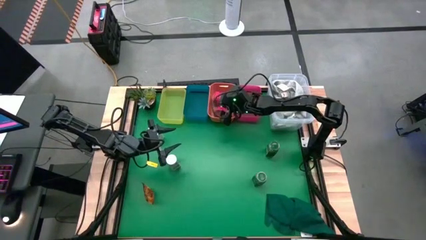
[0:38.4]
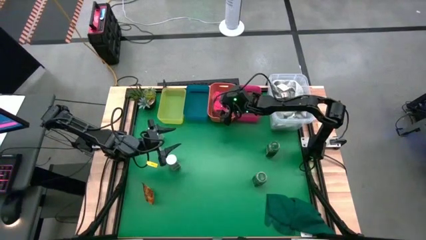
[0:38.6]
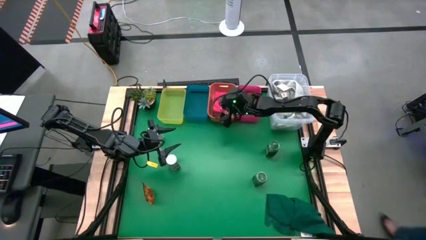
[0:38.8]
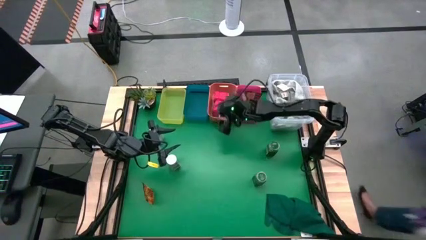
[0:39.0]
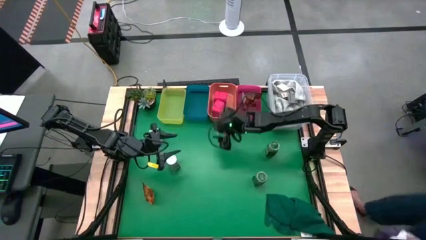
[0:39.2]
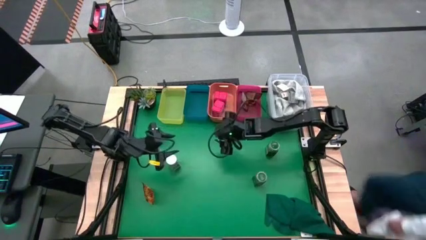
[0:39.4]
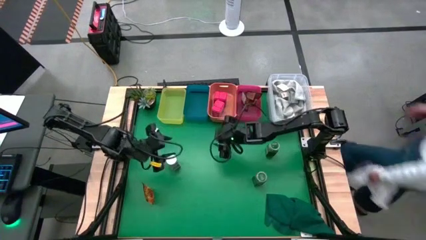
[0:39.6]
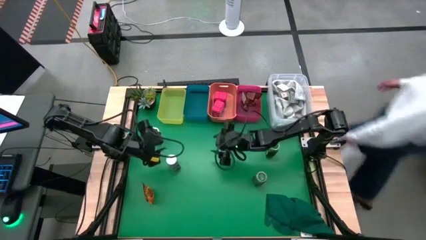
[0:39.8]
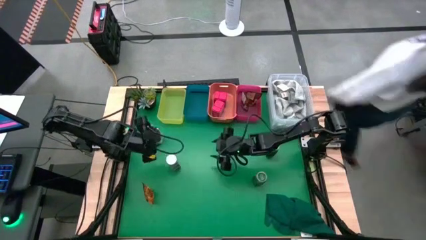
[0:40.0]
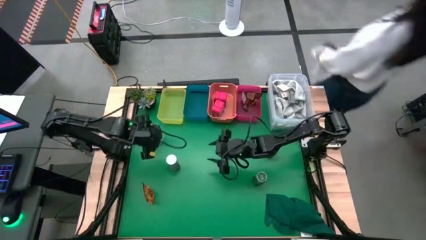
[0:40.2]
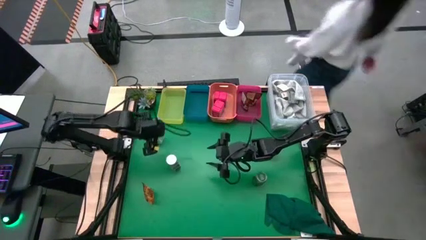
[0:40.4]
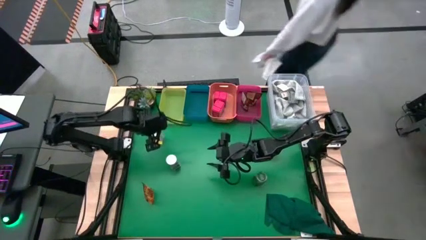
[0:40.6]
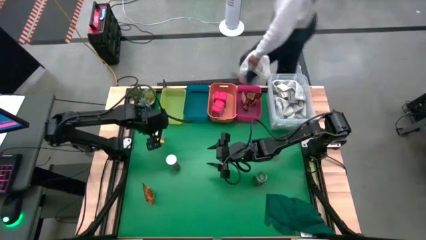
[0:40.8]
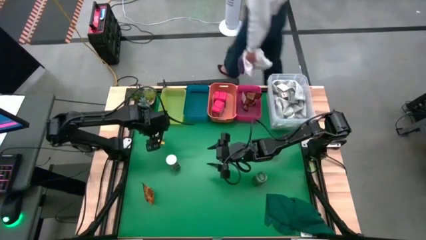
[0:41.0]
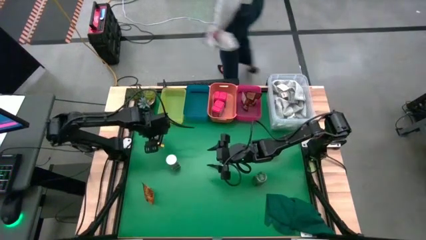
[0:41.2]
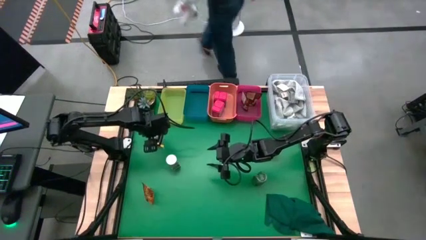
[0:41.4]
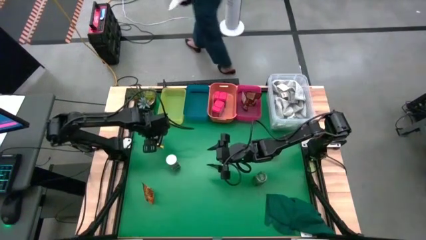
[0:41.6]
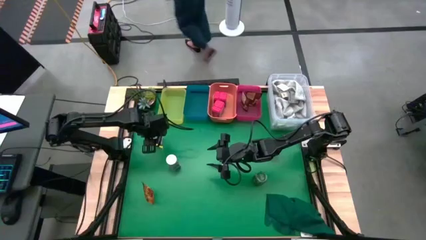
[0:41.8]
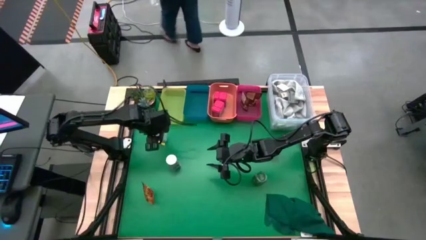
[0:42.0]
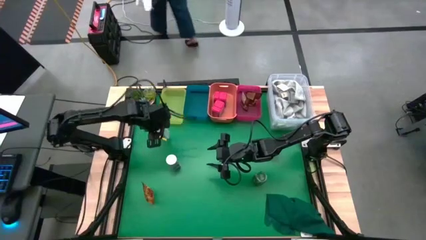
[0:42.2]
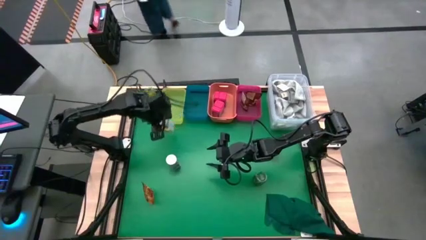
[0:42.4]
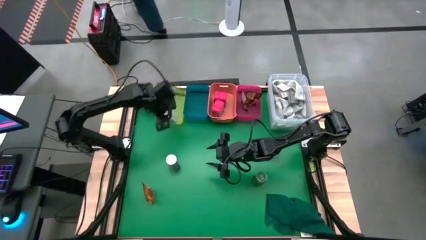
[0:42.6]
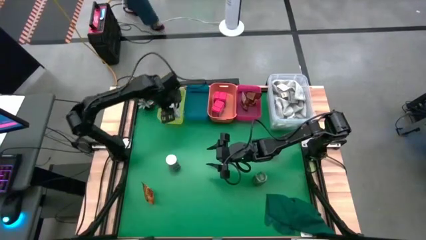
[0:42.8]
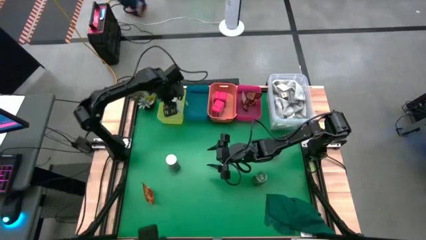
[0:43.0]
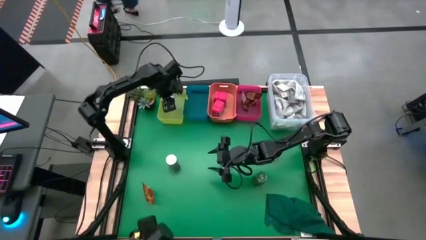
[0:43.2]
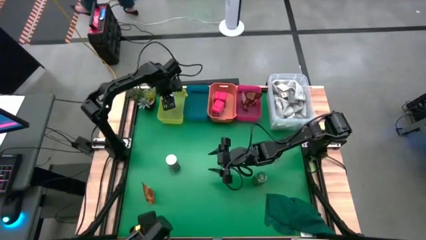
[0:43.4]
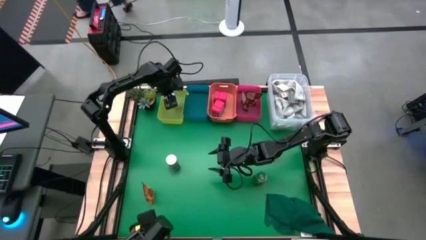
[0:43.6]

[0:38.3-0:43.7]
Task: Sort spices by type
Put the top white seasoning bottle into the yellow bin

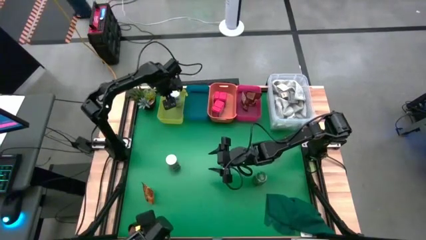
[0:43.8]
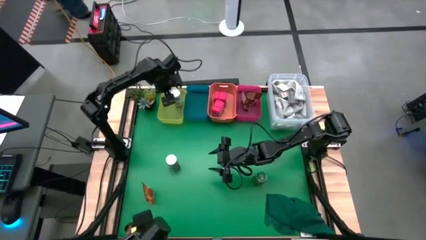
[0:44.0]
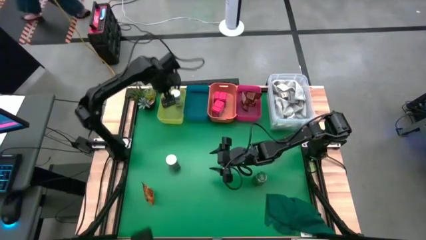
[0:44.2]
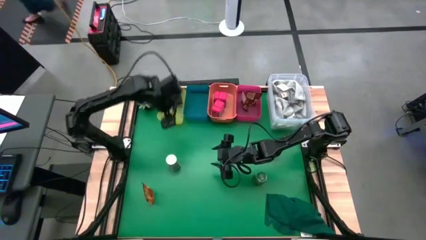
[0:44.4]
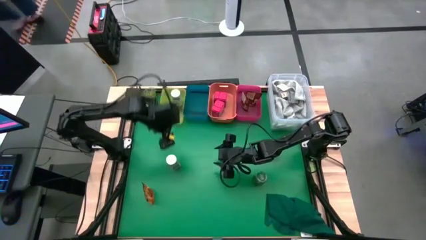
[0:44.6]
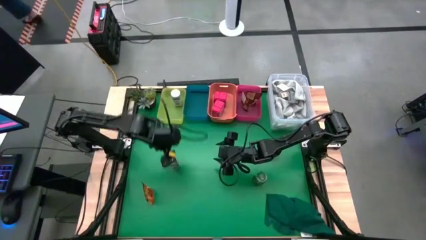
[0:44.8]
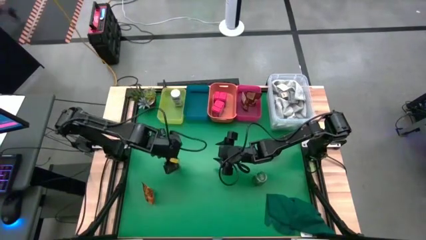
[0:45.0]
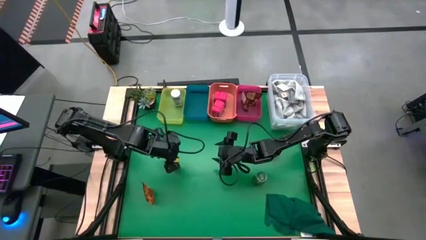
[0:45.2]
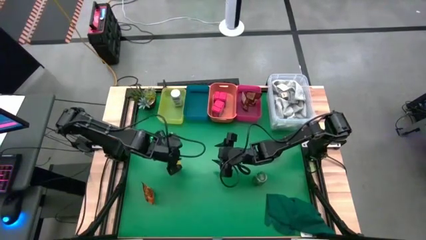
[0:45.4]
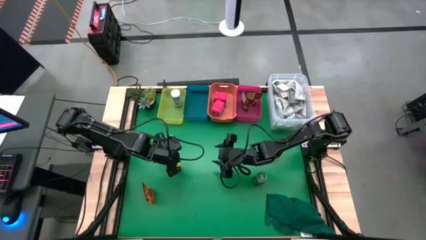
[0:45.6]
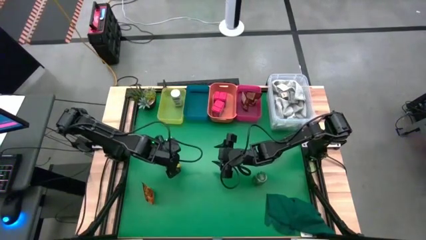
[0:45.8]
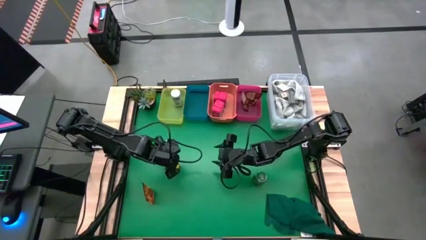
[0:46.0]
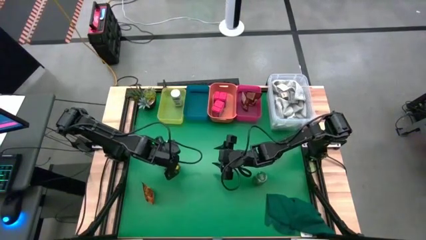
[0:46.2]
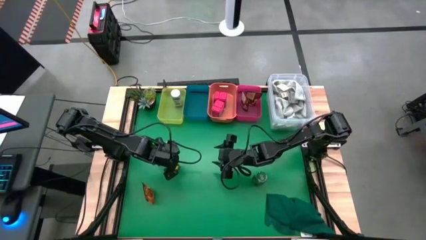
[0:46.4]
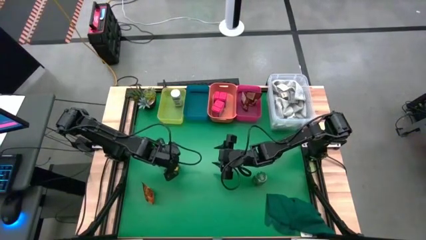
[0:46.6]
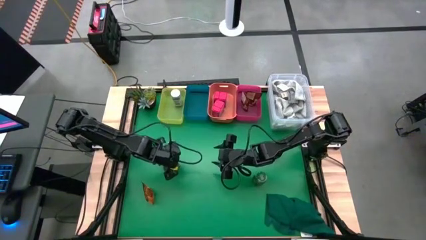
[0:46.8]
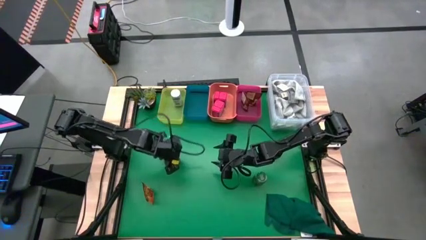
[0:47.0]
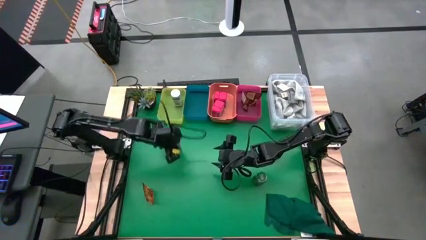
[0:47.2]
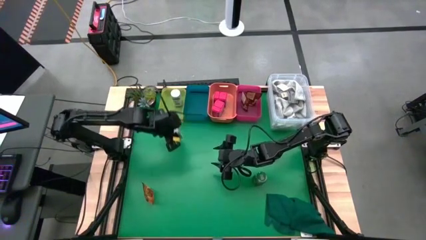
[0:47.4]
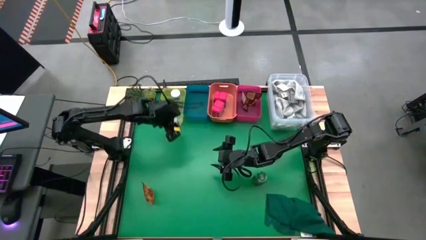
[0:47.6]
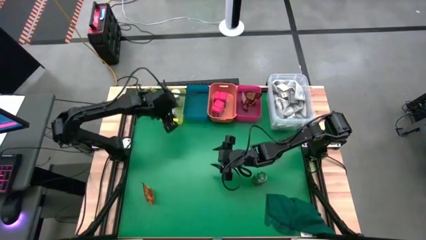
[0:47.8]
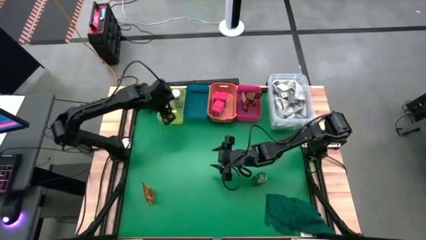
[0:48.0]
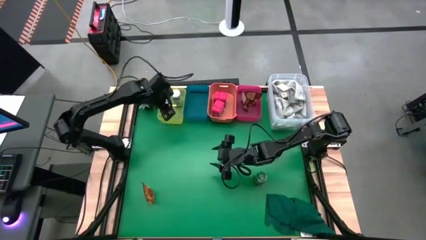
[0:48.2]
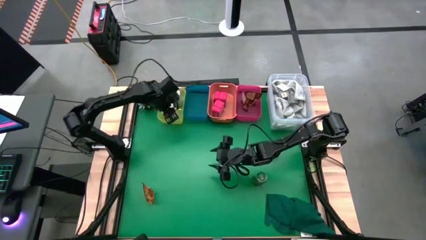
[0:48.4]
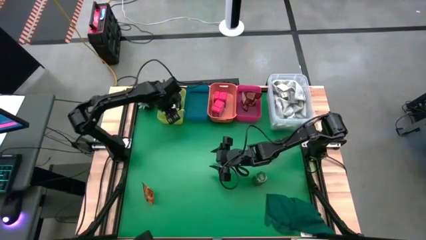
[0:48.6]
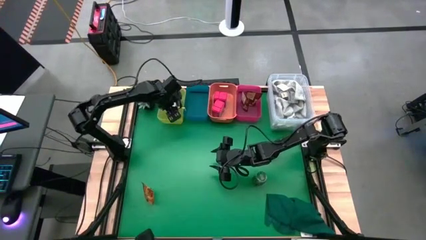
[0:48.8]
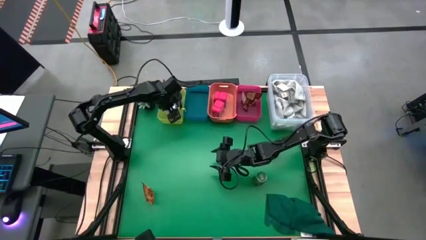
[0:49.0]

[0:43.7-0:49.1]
Put the white seasoning bottle into the yellow bin

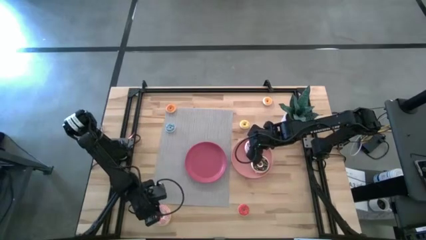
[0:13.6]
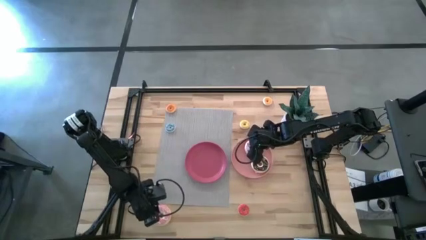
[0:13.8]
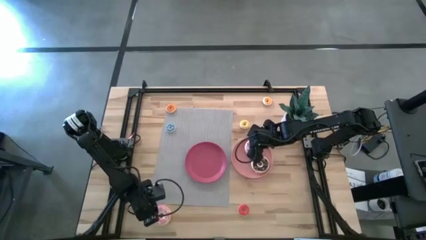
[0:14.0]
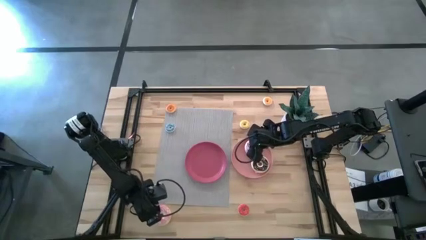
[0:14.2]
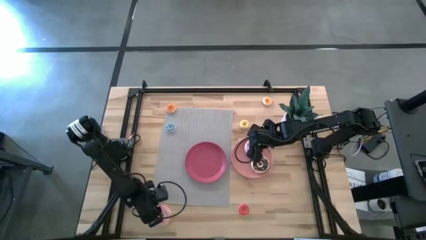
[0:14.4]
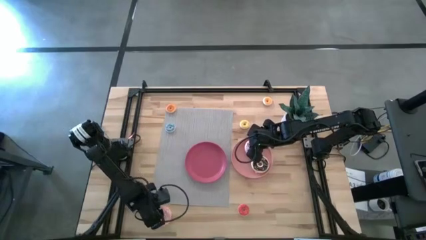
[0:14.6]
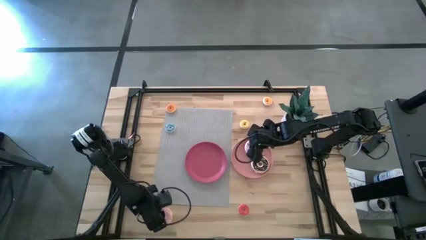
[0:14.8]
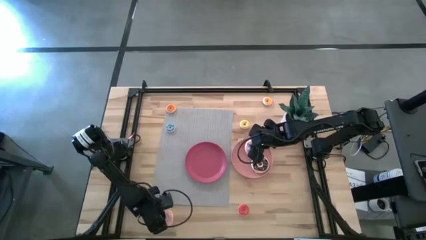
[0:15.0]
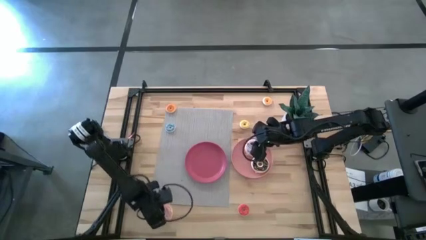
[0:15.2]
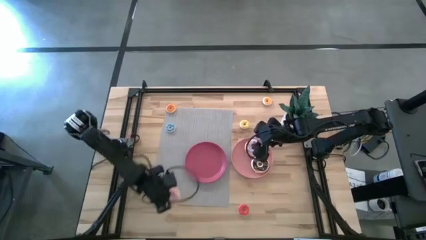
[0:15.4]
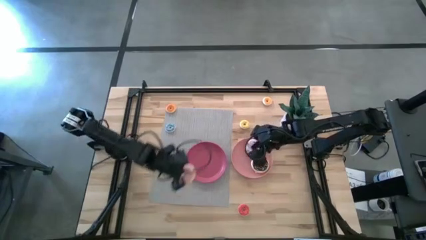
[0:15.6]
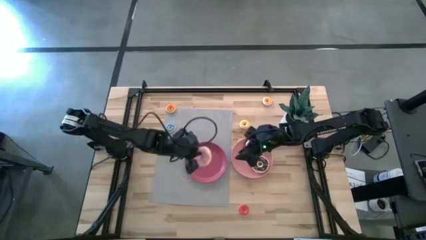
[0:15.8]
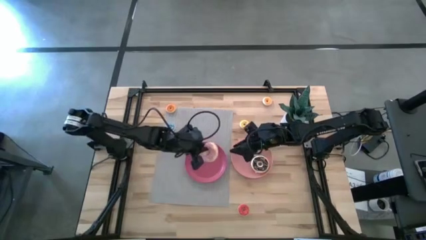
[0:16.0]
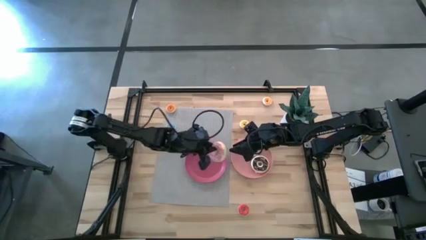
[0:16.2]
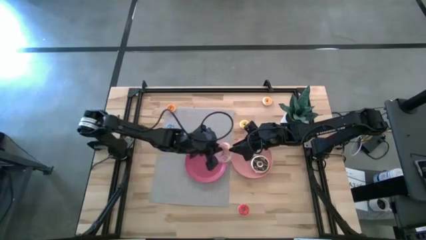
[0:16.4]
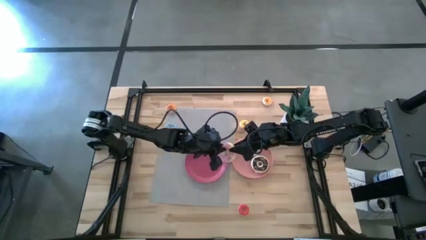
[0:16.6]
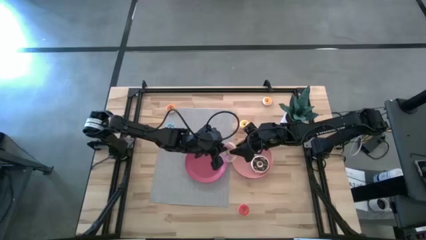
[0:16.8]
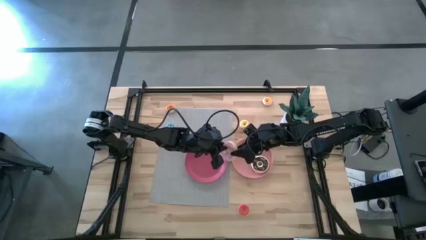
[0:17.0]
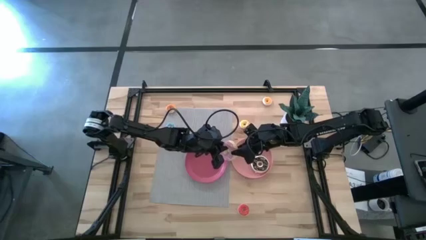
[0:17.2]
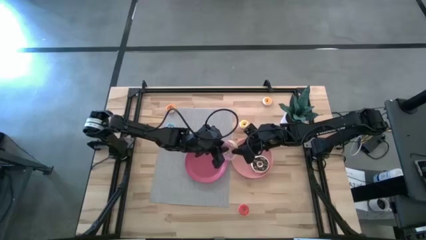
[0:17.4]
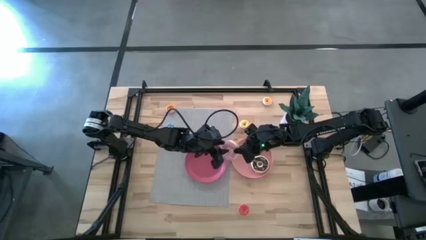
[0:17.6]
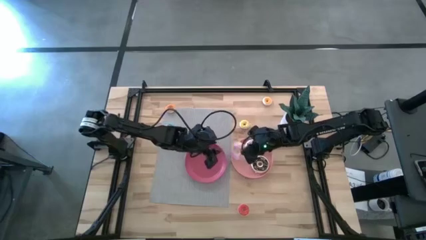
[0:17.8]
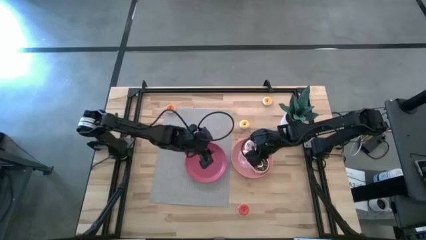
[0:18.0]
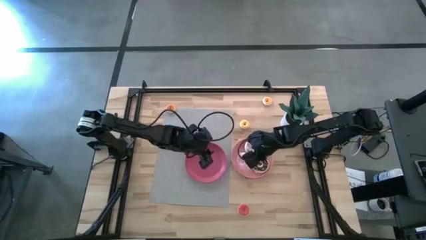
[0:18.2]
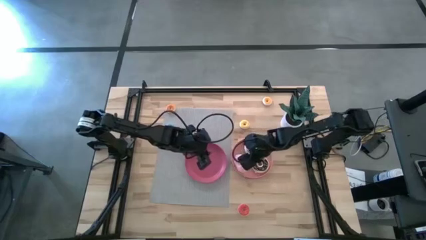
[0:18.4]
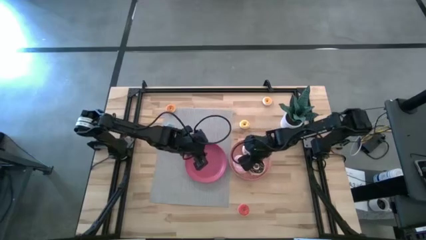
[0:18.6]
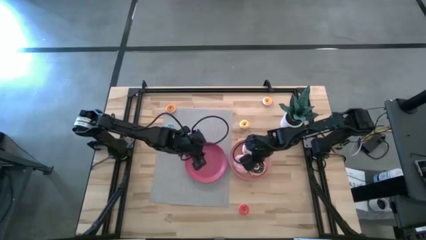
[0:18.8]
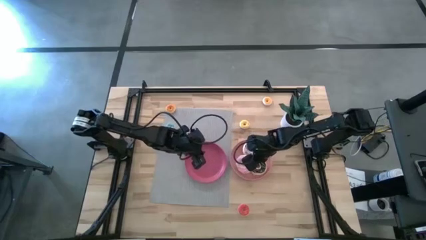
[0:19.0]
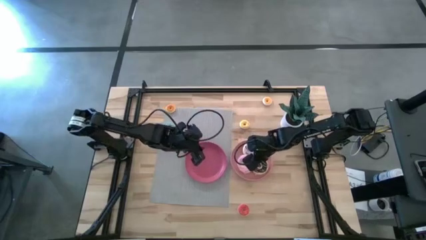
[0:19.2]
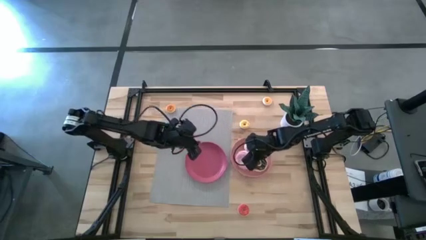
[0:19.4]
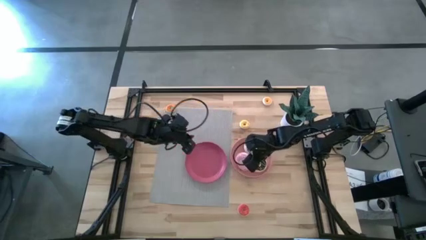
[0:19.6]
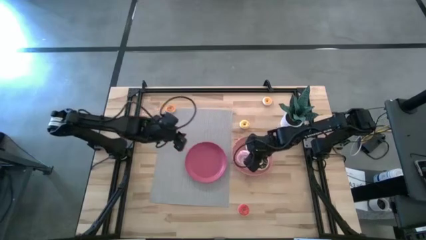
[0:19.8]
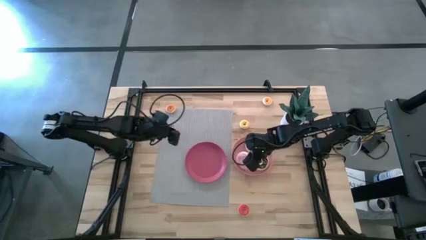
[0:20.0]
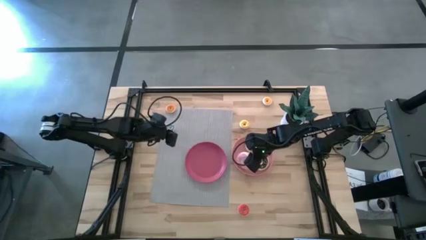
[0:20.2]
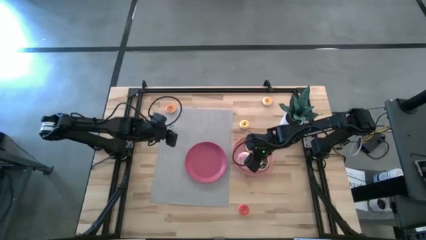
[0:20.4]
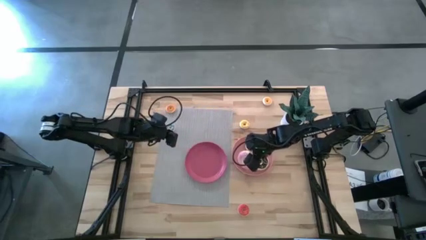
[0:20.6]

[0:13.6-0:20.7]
Task: Pick & Place donuts
Put the large pink donut on the pink plate
